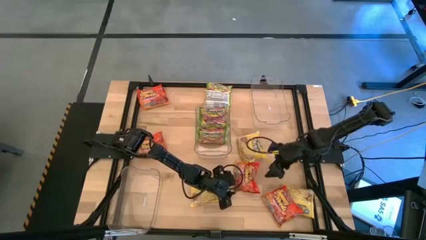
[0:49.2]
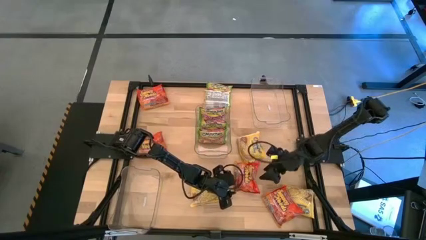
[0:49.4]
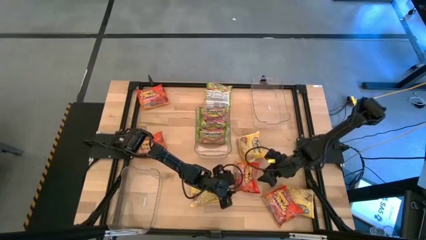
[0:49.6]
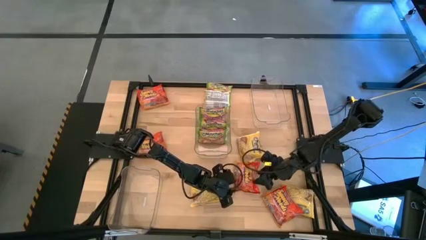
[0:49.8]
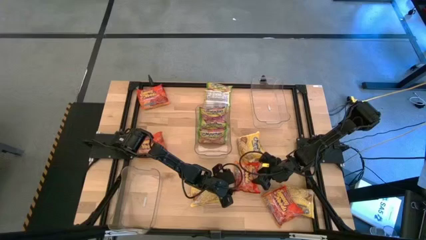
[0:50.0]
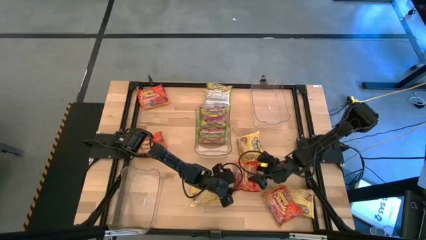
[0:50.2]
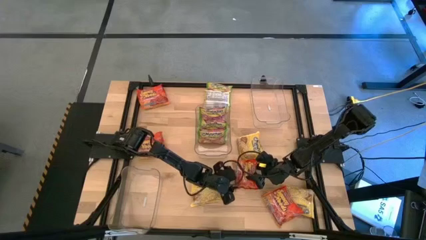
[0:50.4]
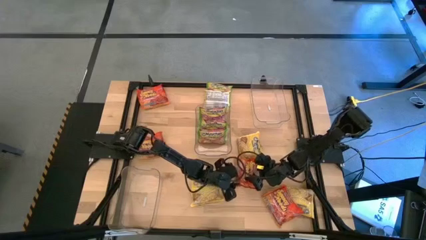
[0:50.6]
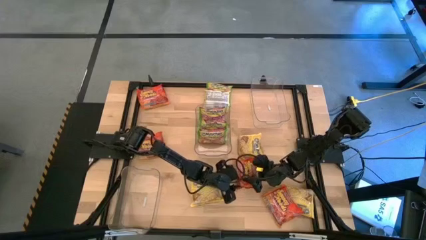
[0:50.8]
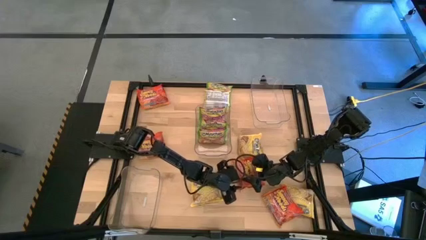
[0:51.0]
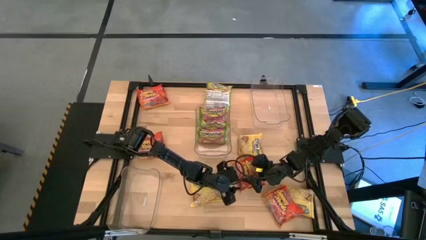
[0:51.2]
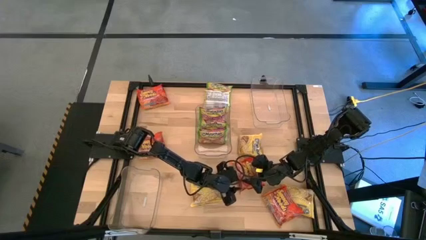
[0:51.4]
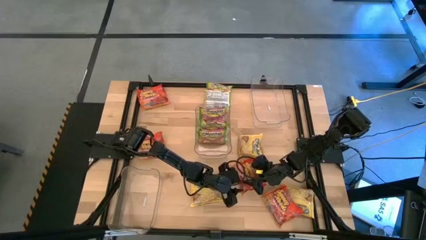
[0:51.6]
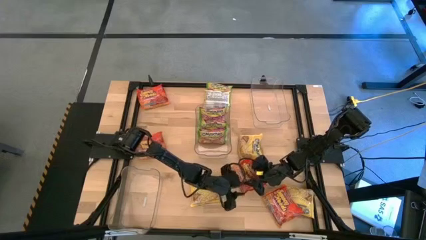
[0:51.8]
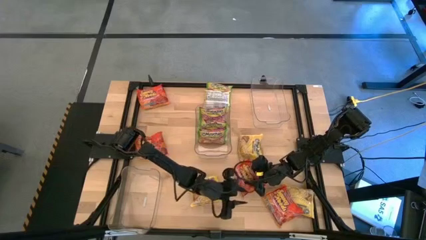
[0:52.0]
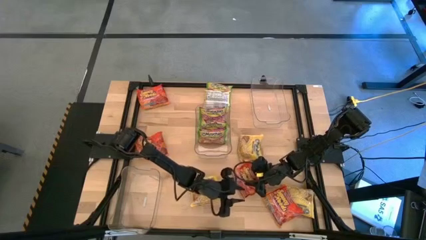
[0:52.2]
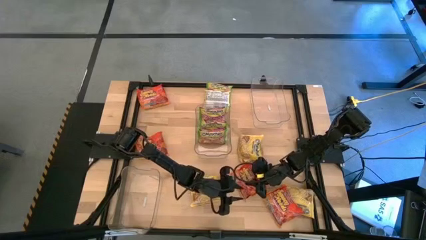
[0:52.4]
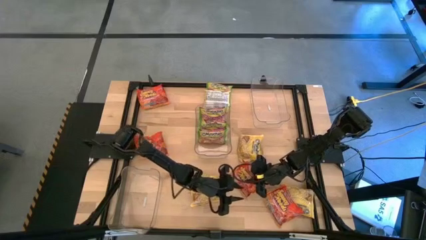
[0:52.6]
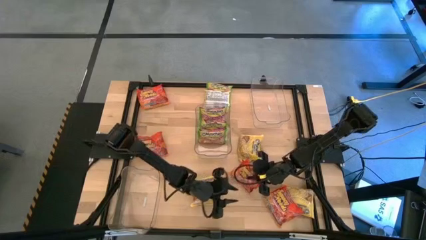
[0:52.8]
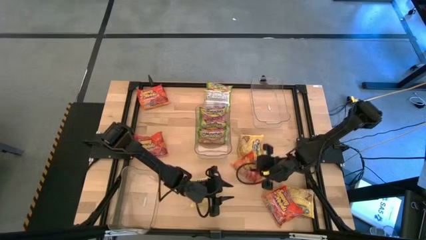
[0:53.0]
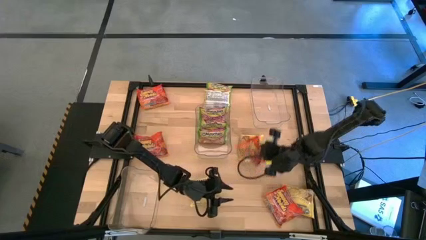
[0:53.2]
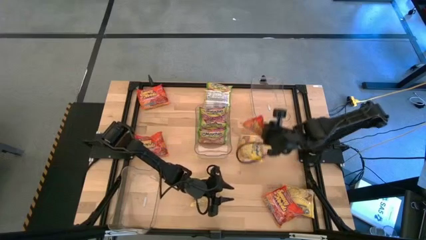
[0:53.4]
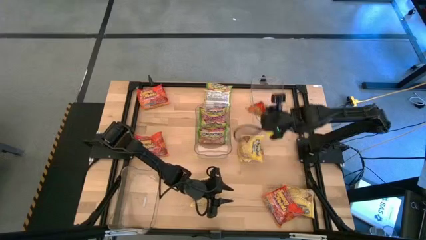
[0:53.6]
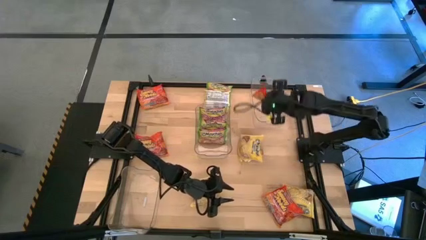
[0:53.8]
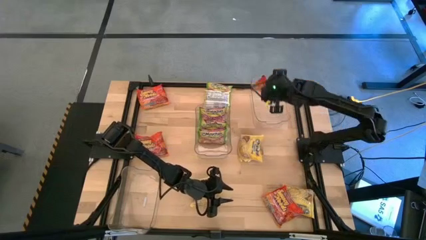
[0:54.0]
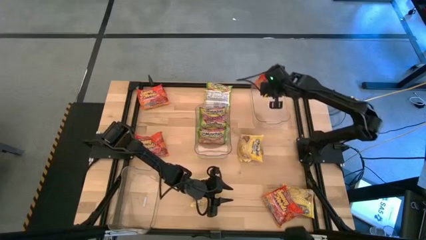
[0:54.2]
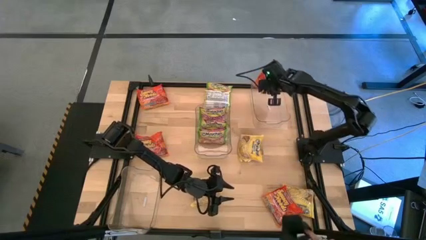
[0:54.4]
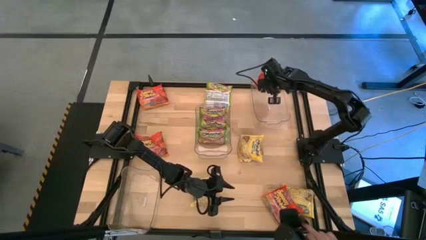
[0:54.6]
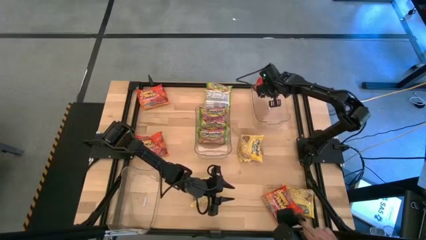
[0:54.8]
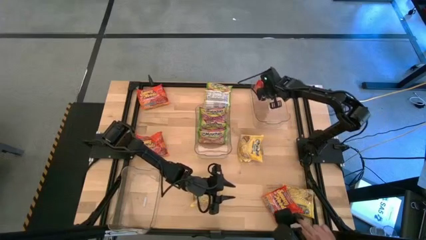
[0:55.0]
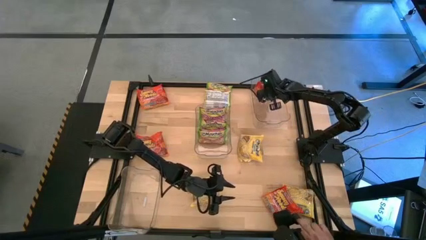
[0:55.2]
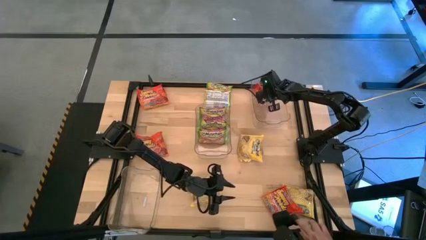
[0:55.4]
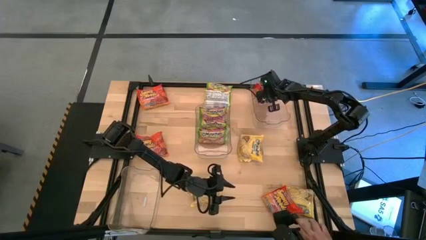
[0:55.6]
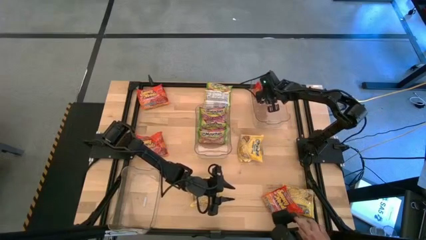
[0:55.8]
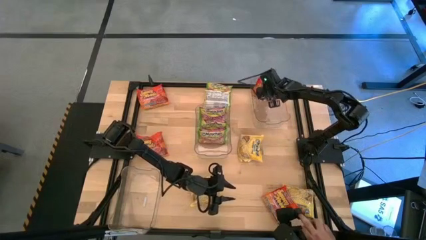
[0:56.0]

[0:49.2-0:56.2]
Task: Sort Maruchan noodles
Put the orange noodle pack into the top right transparent bin

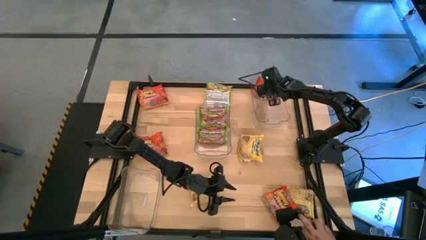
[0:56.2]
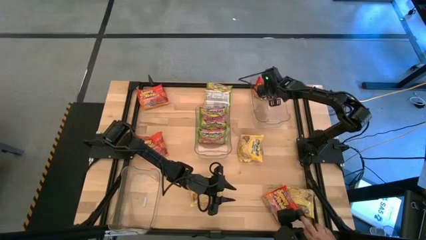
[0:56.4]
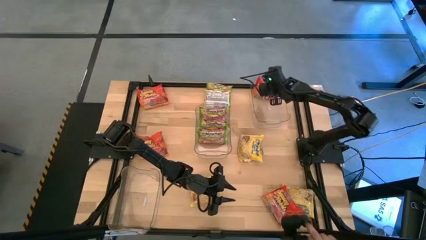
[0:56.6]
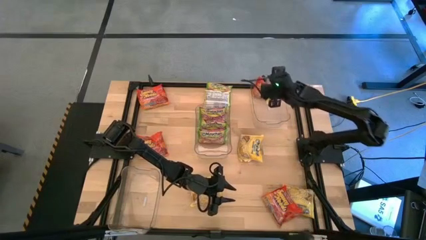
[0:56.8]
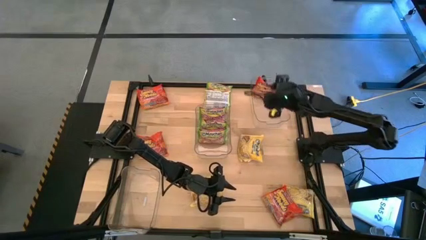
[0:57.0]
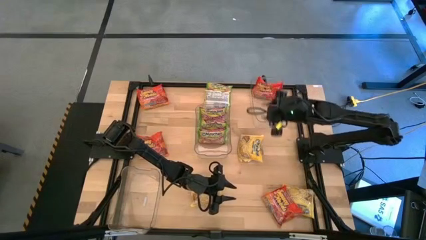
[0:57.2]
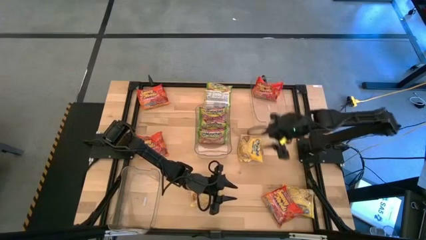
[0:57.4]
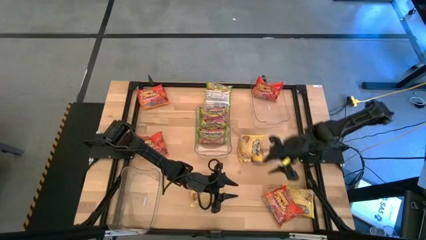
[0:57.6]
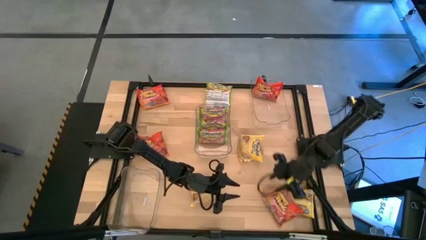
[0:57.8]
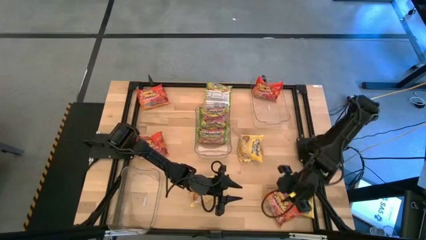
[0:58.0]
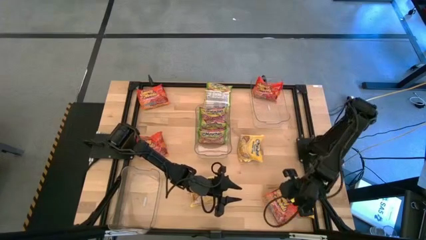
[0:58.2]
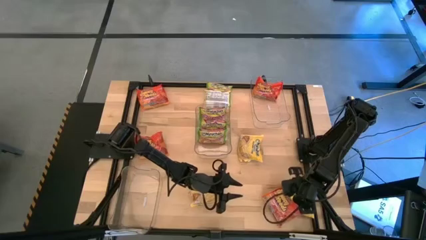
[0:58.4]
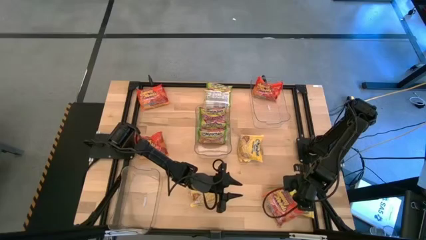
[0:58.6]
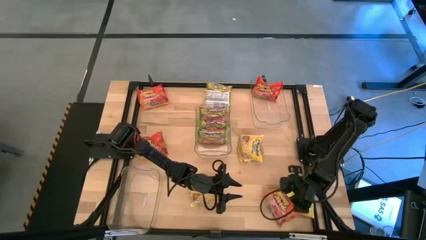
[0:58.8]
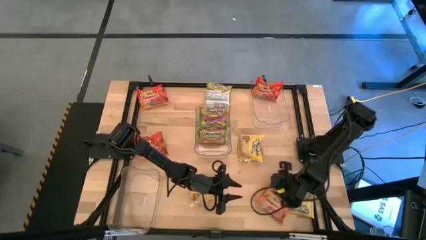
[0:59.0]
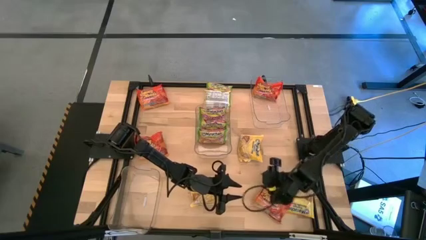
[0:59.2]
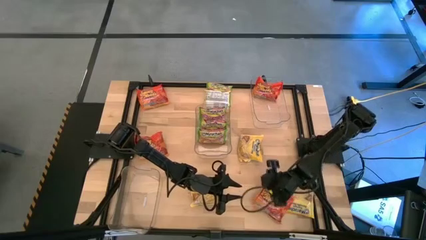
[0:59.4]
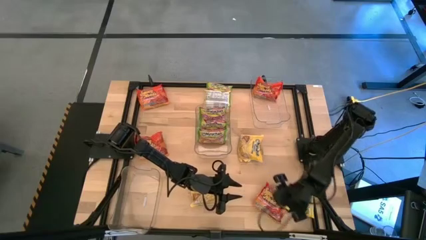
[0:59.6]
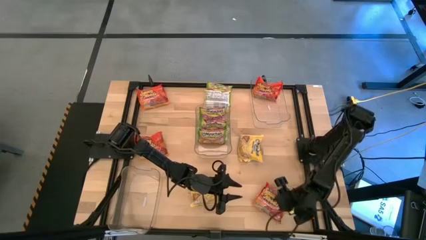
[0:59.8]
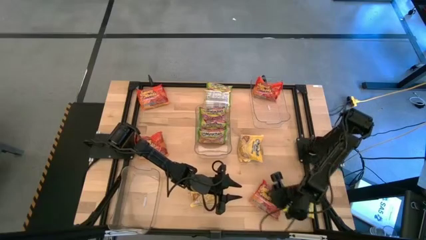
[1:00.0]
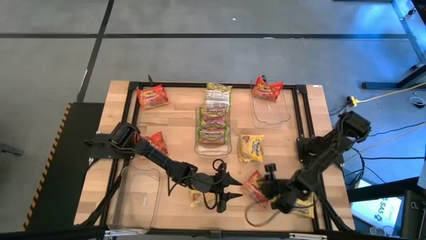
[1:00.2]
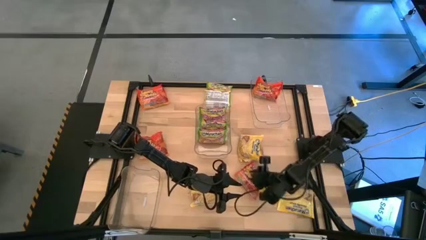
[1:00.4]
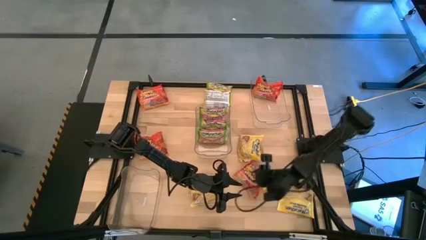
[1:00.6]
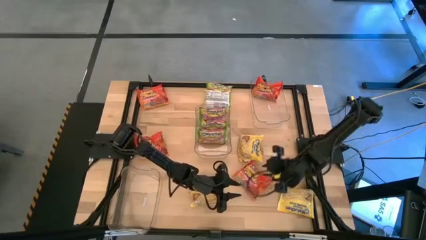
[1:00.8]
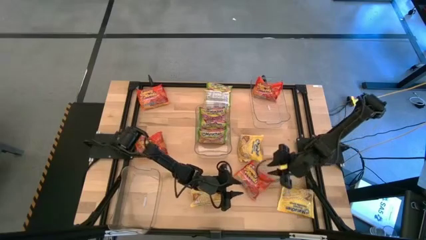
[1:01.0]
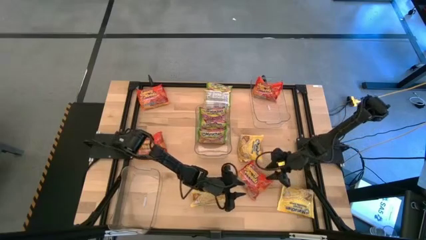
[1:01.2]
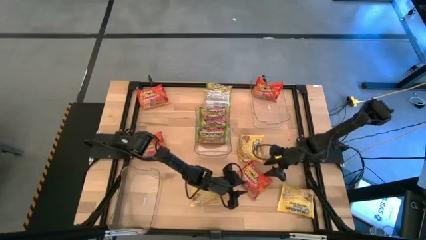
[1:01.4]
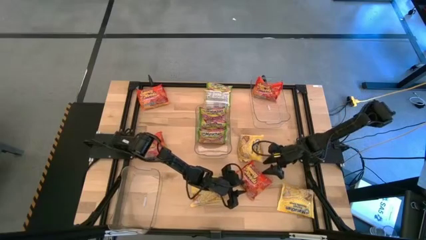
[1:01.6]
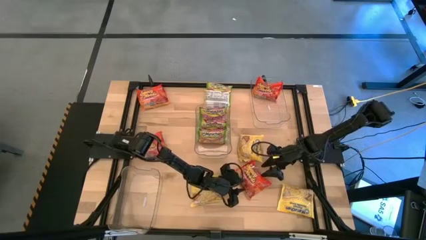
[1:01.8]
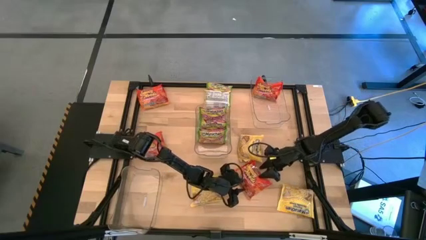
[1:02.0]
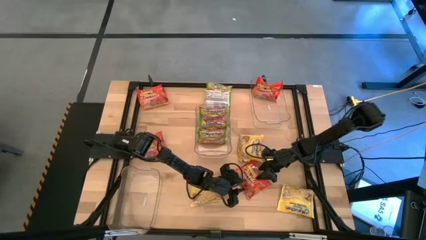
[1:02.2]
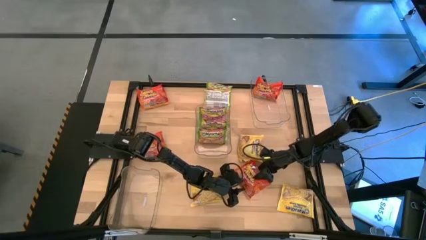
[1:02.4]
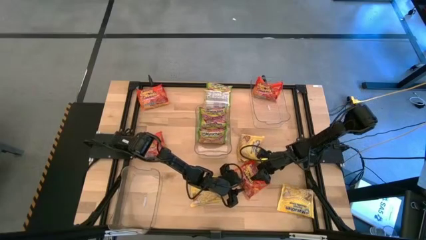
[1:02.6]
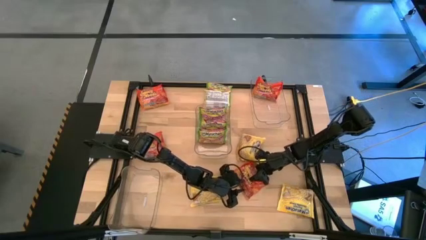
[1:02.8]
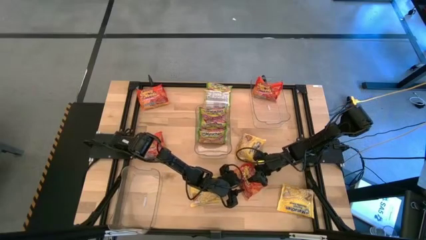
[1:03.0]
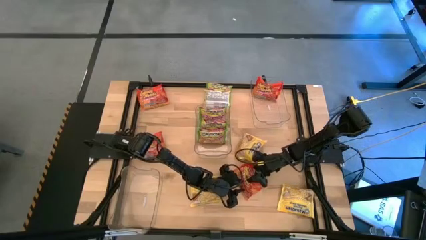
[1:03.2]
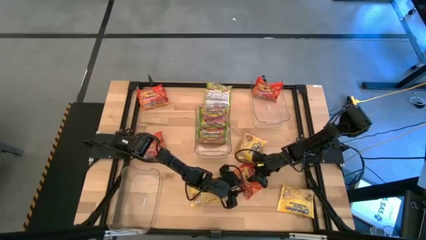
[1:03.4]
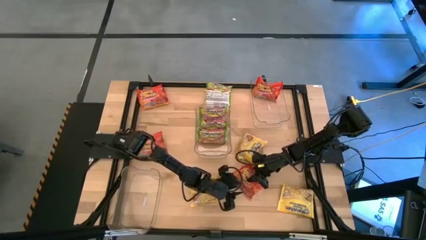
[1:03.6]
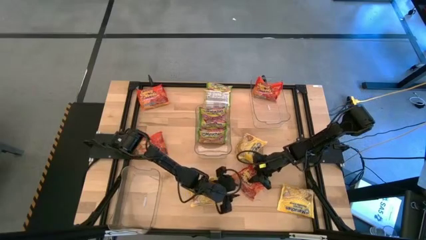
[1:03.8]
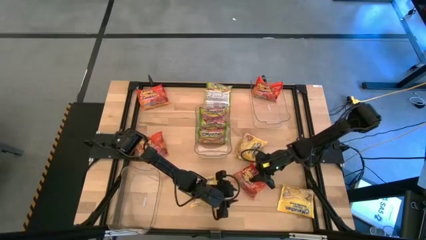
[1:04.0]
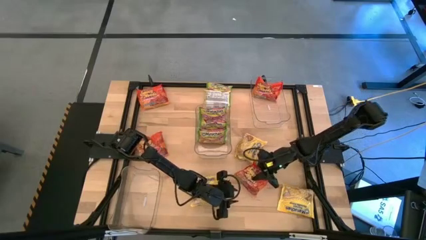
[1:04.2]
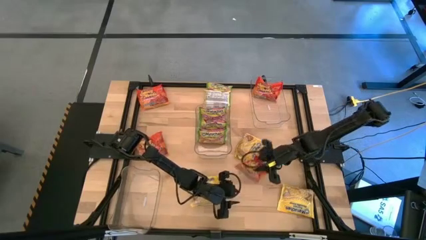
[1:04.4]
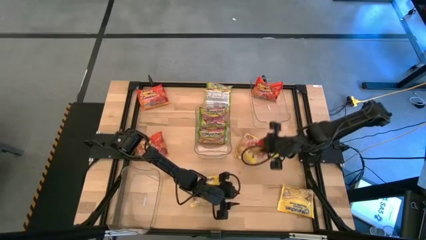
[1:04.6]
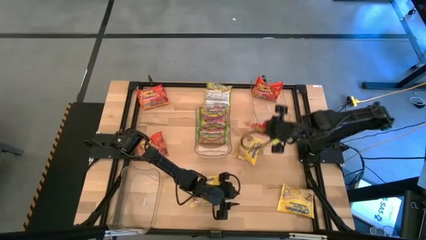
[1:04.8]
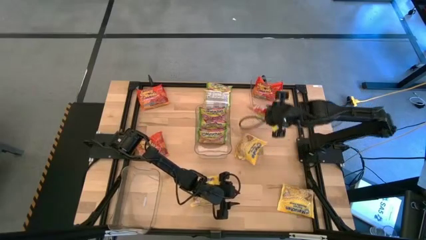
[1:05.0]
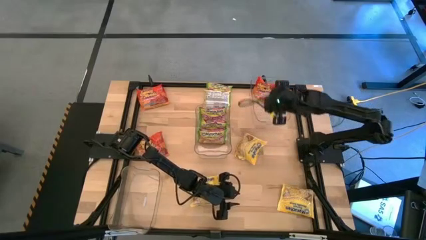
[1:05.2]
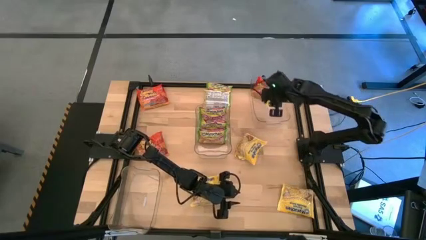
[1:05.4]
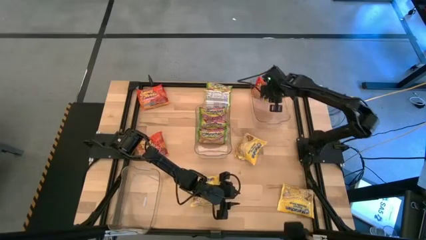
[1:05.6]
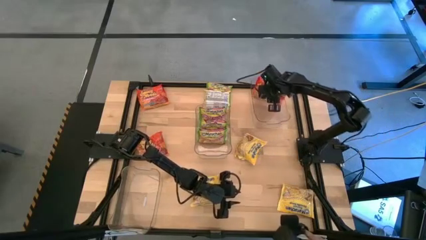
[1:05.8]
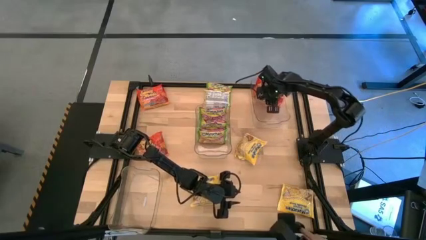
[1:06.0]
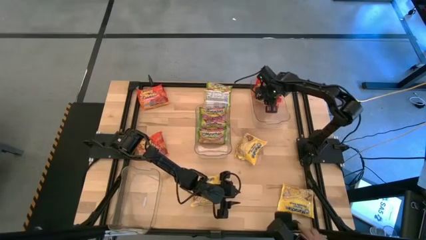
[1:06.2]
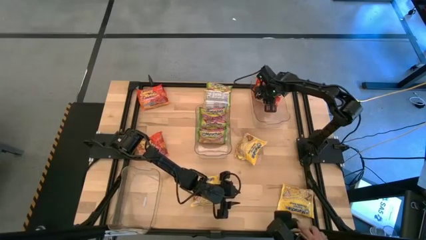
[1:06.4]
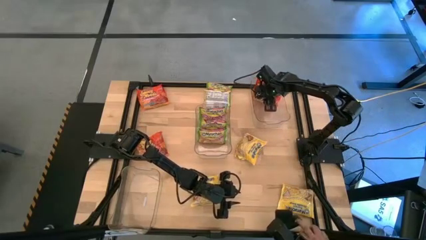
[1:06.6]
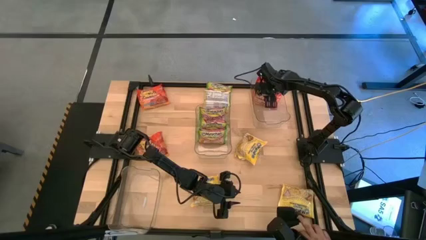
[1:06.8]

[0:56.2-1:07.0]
Put the bottom orange noodle pack into the top right transparent bin
